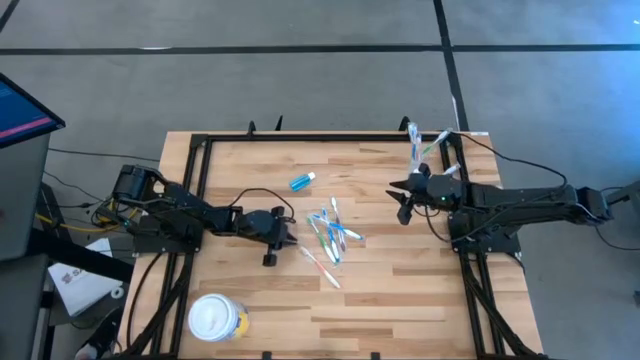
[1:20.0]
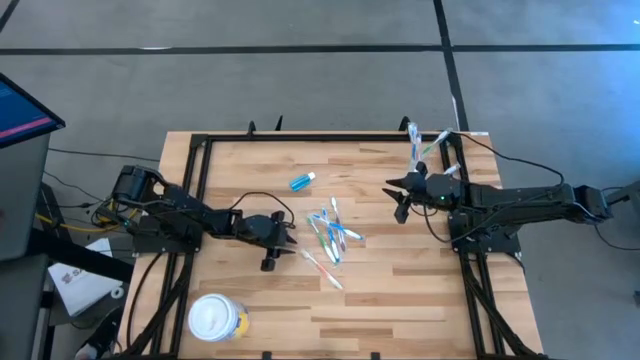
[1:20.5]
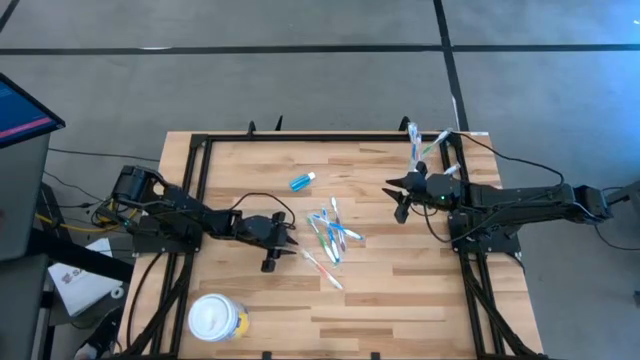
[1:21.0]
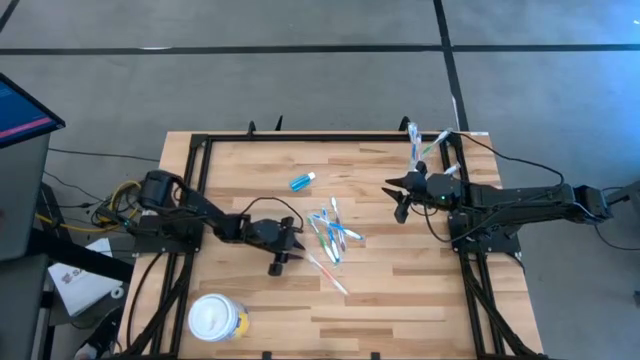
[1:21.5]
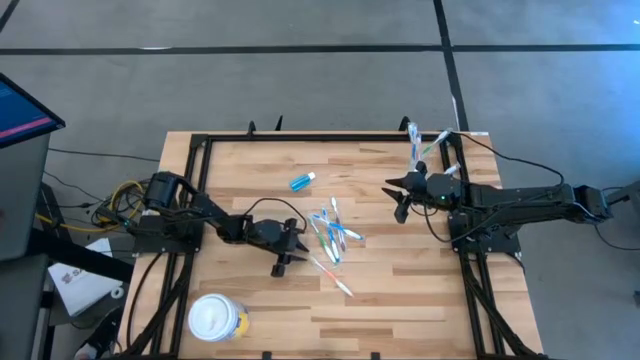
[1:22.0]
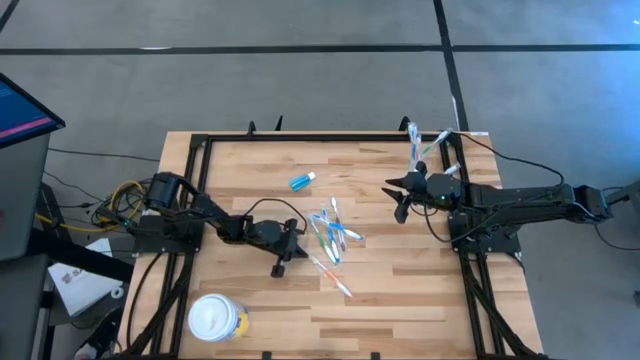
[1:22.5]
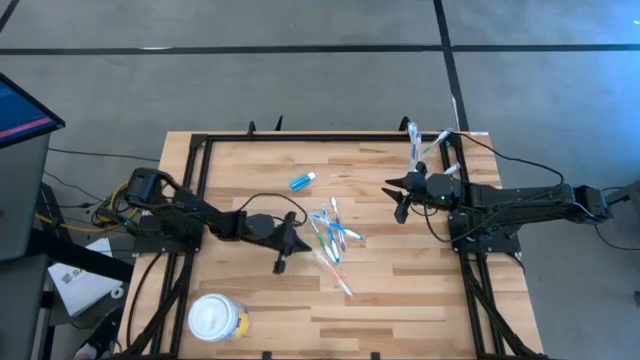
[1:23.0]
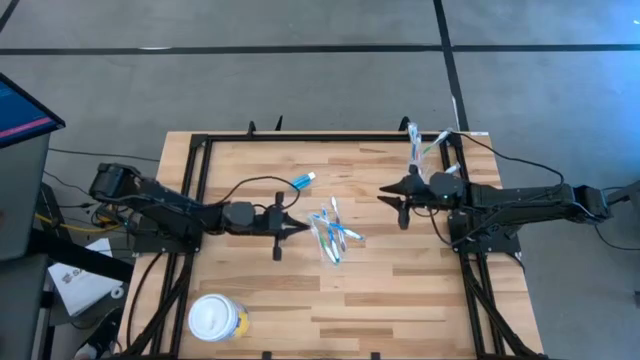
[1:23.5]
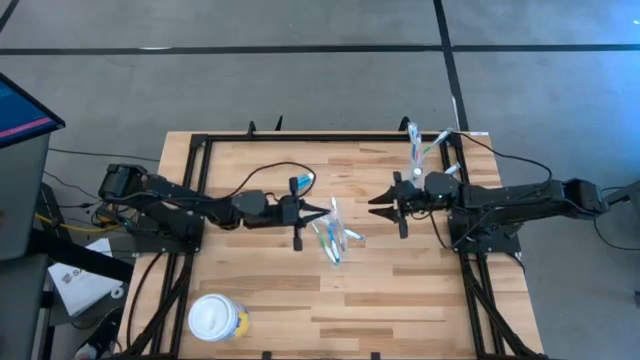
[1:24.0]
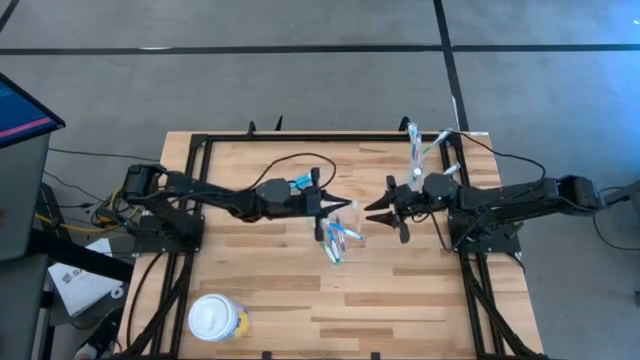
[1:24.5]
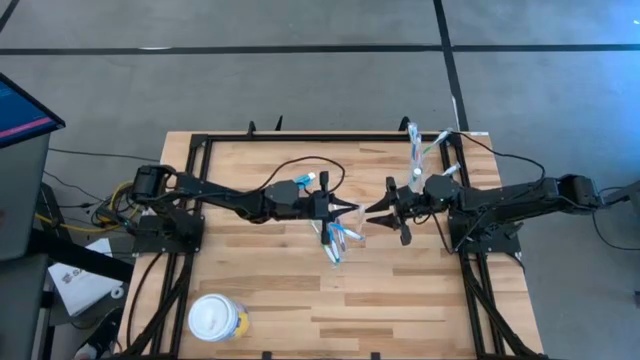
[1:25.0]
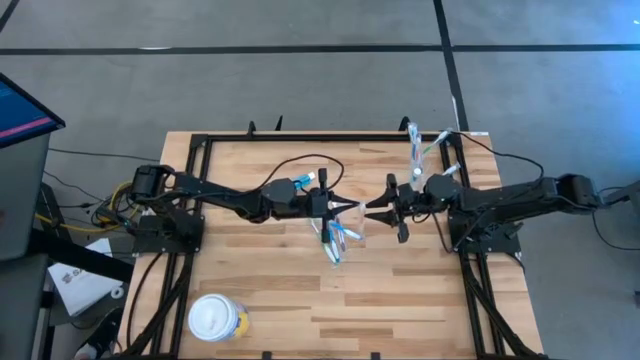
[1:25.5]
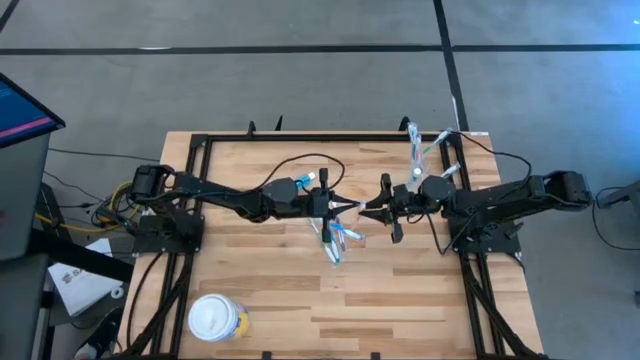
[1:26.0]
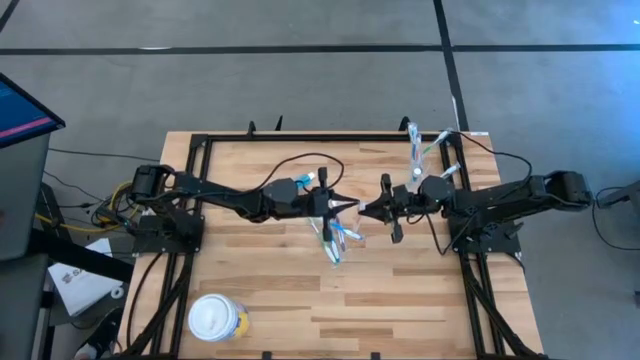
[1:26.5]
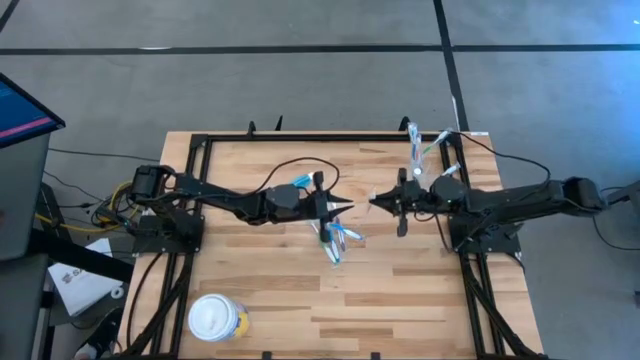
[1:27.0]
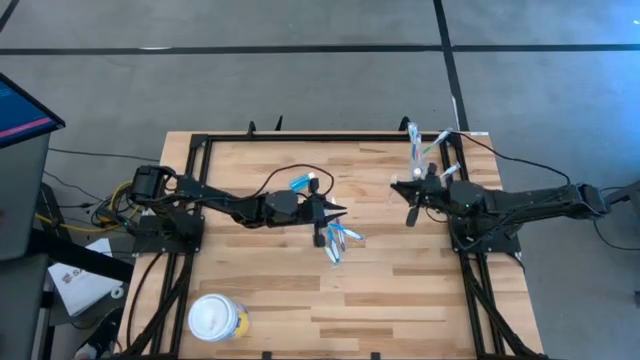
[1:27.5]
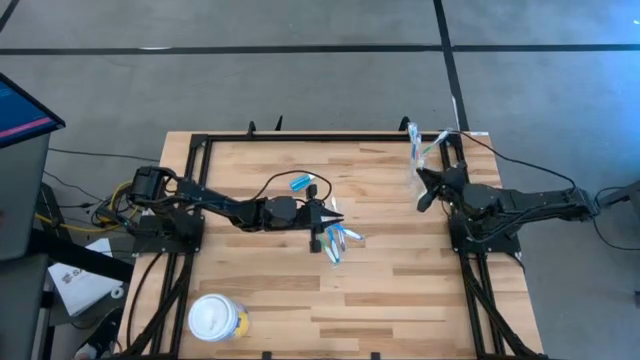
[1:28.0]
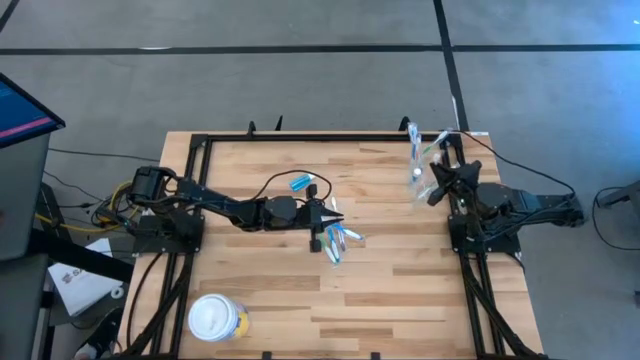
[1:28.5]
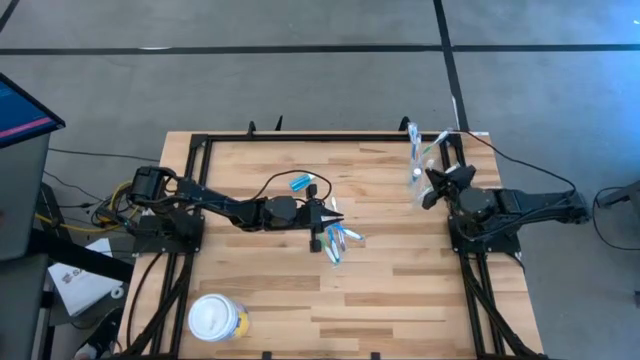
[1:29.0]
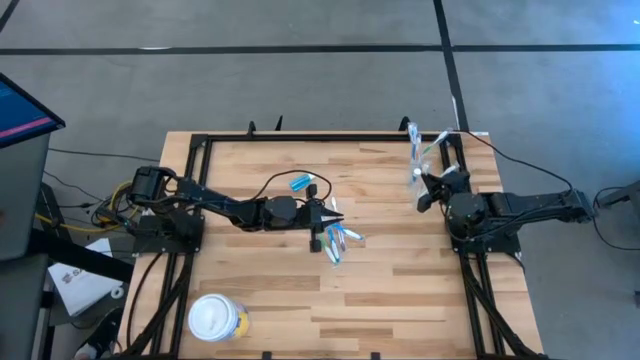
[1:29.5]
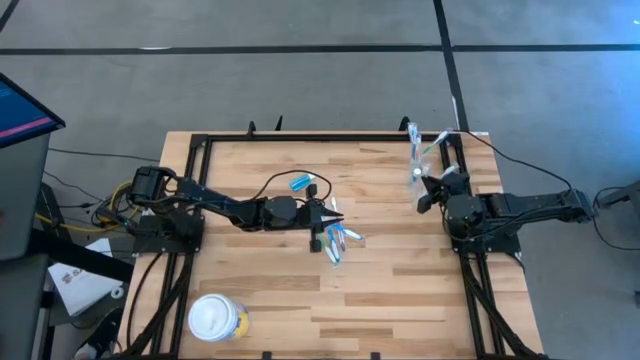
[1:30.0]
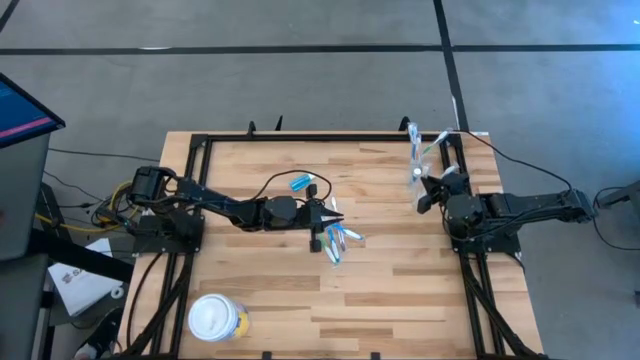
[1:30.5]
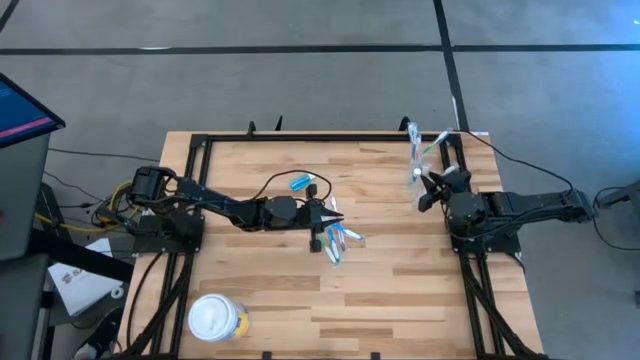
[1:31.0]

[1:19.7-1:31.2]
Task: Pick & Place toothbrushing station
Put the orange toothbrush into the transparent organizer

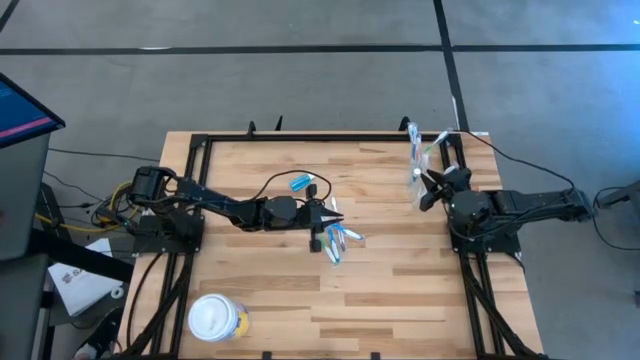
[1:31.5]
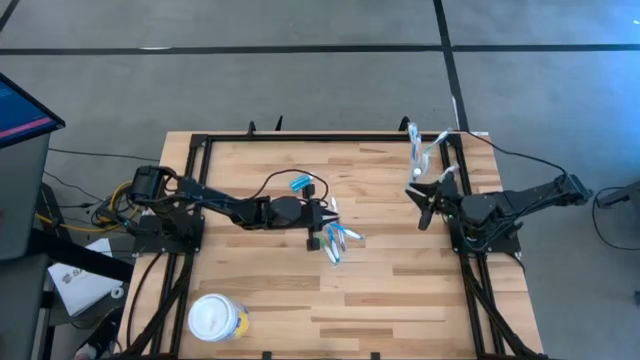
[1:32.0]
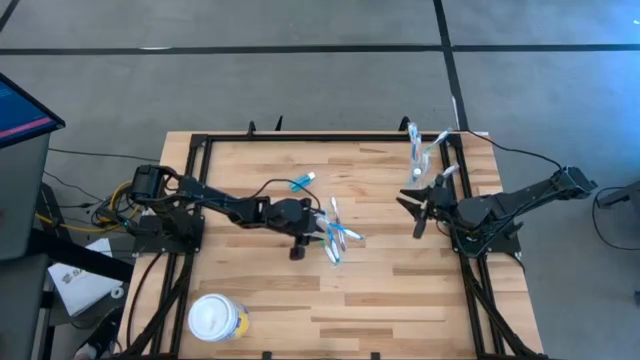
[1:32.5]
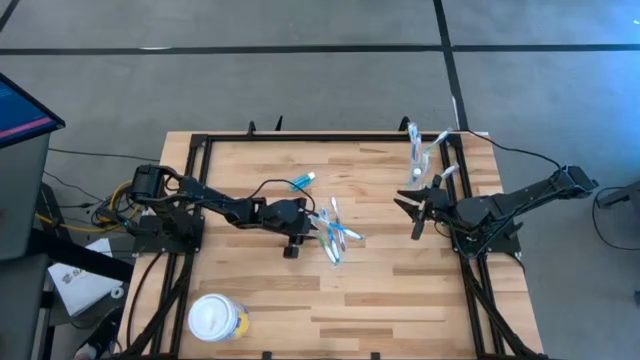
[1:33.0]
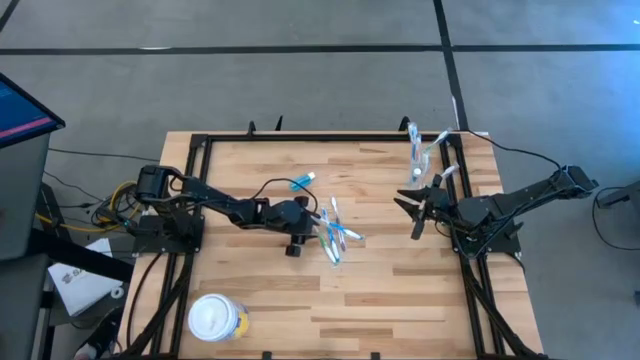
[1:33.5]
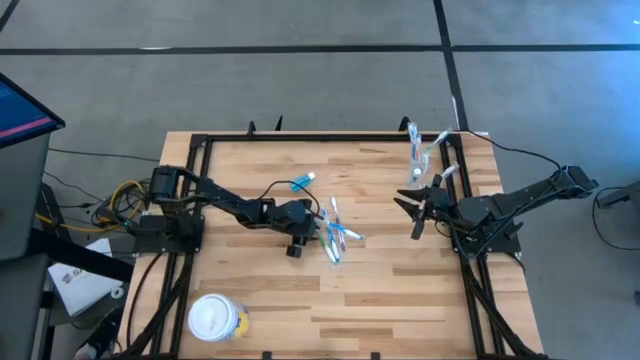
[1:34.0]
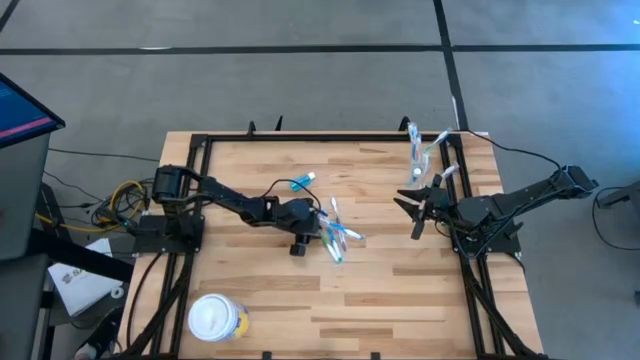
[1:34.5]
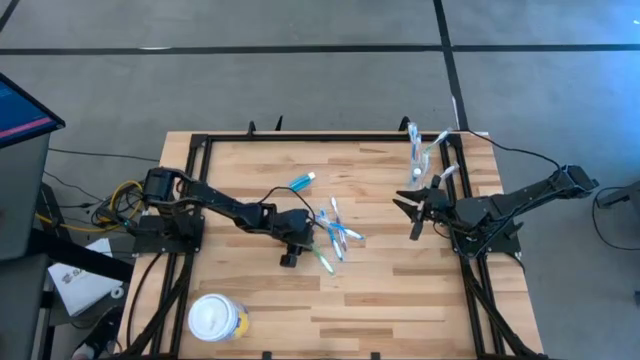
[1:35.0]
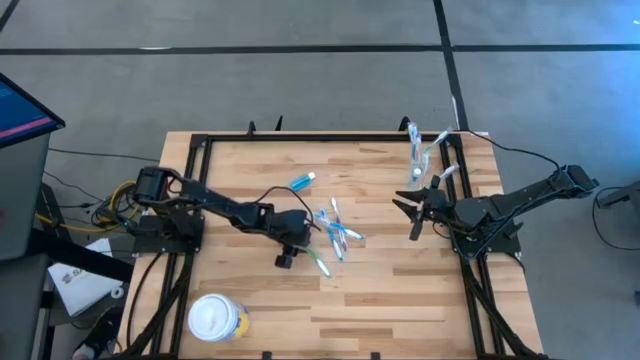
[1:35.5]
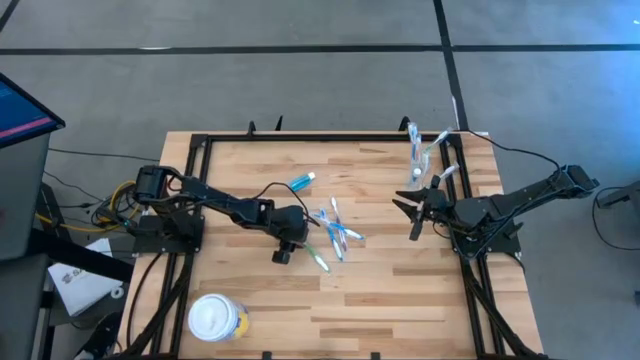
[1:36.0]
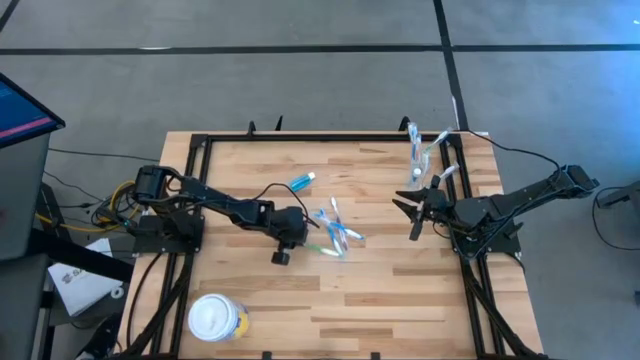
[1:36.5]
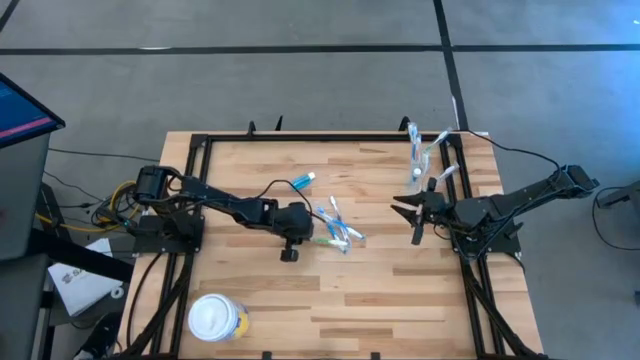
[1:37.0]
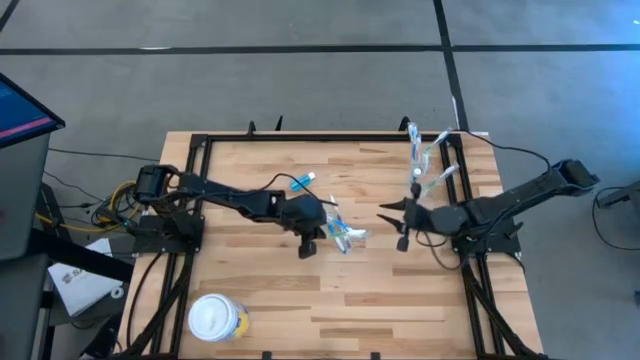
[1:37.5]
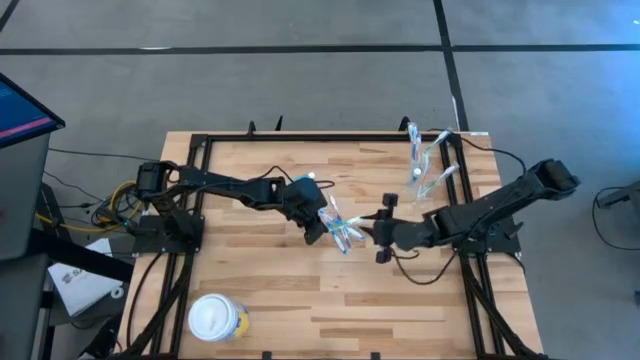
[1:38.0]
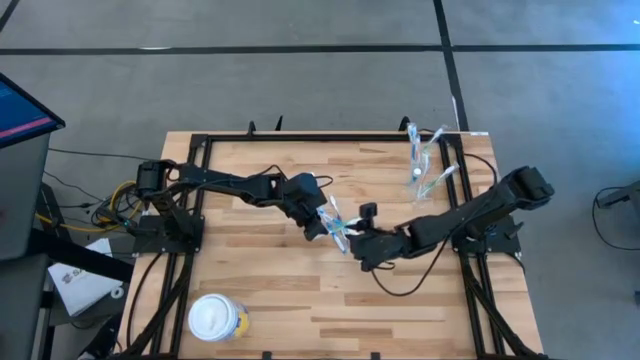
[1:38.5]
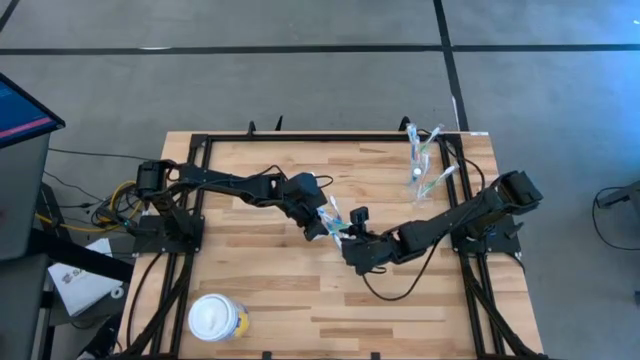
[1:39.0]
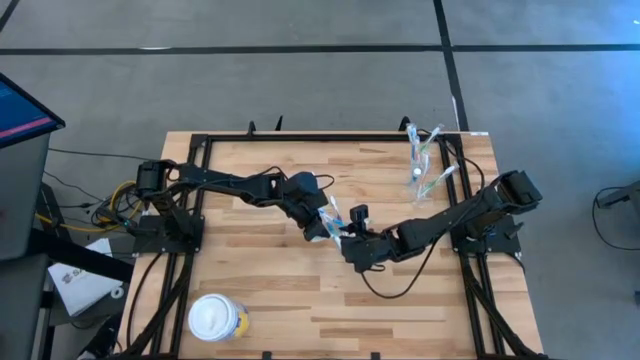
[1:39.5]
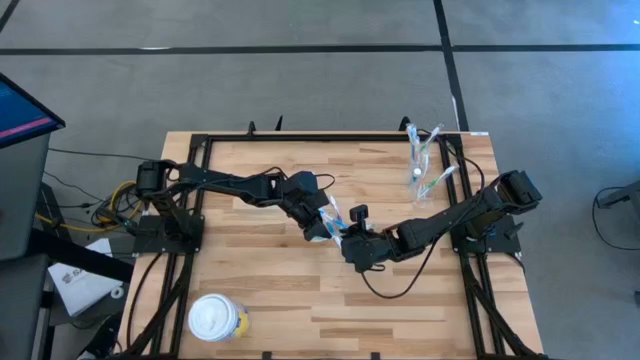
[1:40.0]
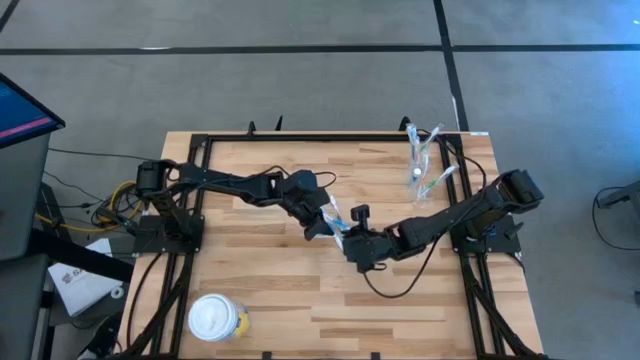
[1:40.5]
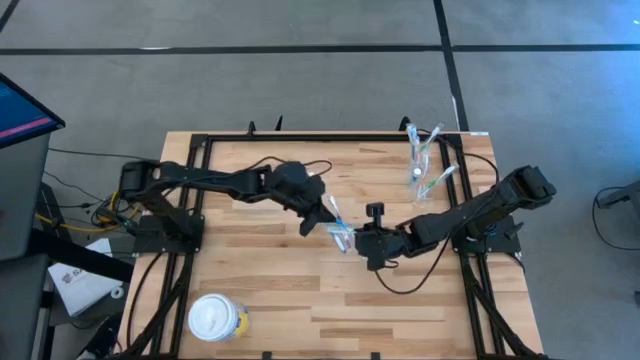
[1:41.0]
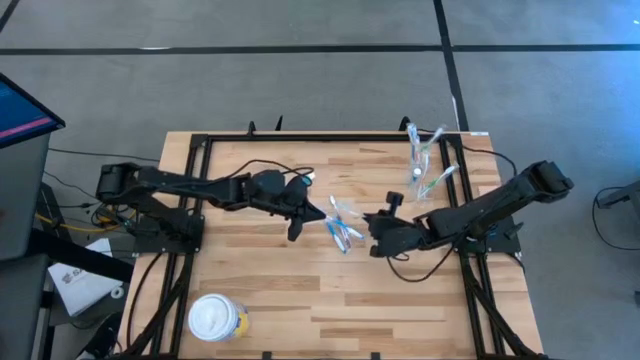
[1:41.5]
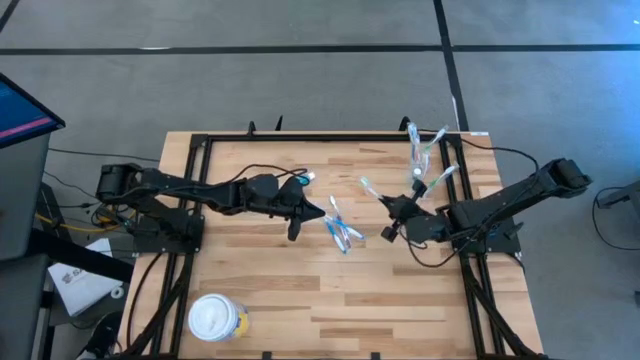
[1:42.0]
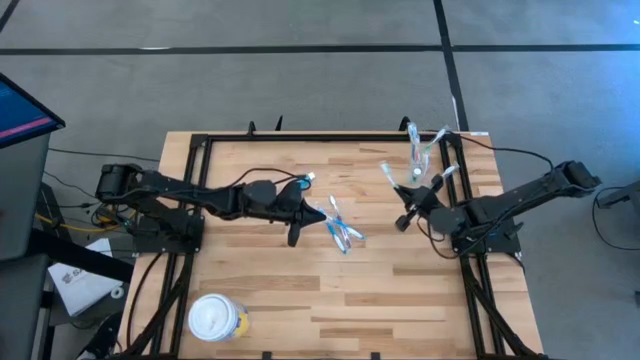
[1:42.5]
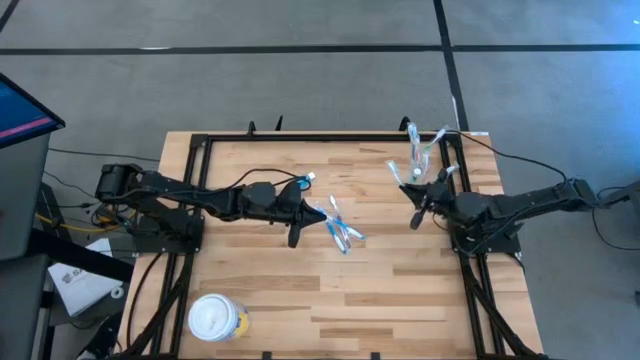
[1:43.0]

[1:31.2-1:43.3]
Put the green toothbrush into the transparent organizer
